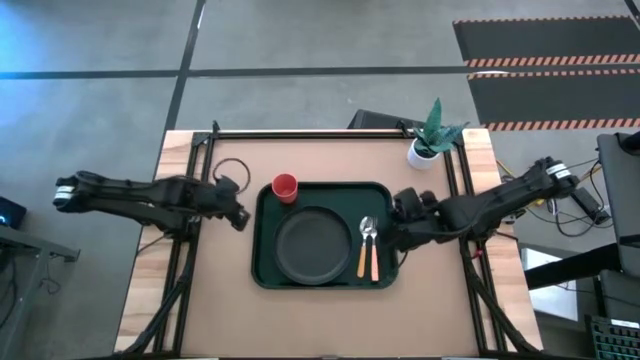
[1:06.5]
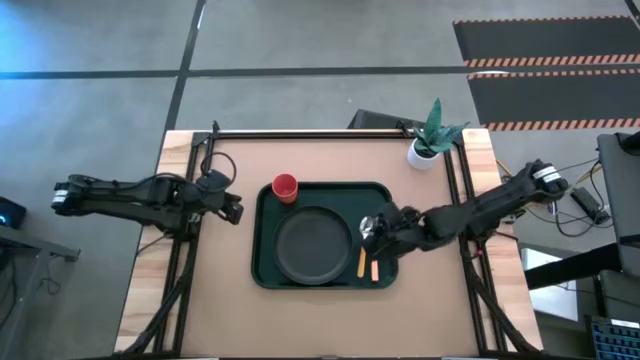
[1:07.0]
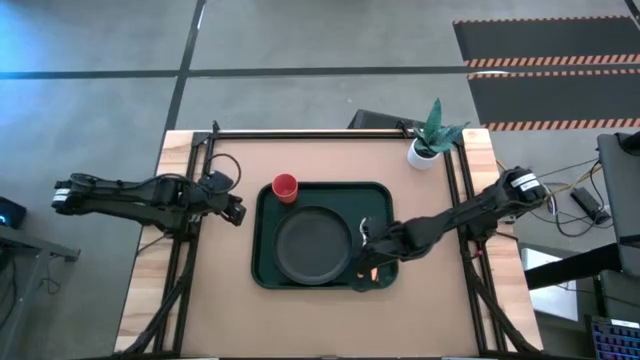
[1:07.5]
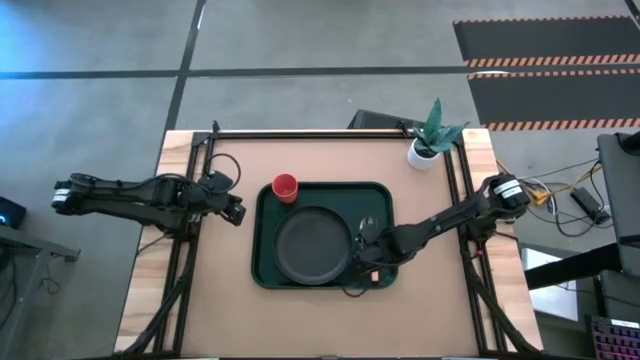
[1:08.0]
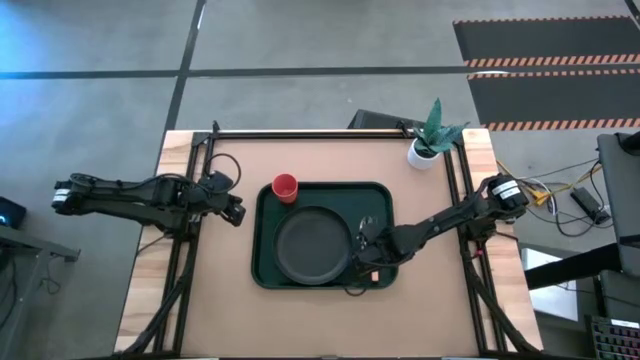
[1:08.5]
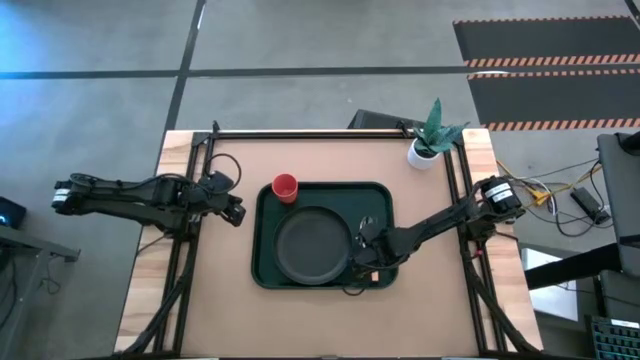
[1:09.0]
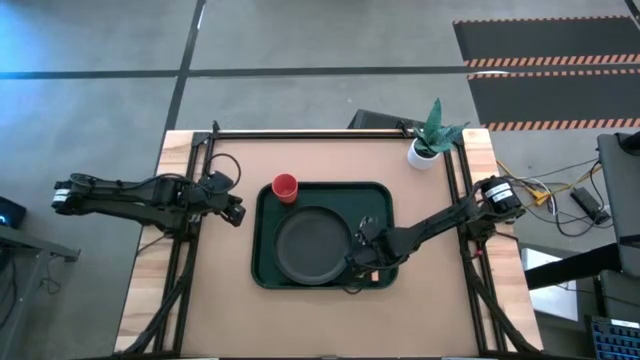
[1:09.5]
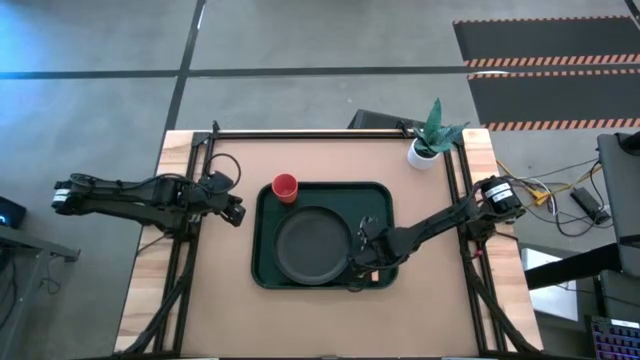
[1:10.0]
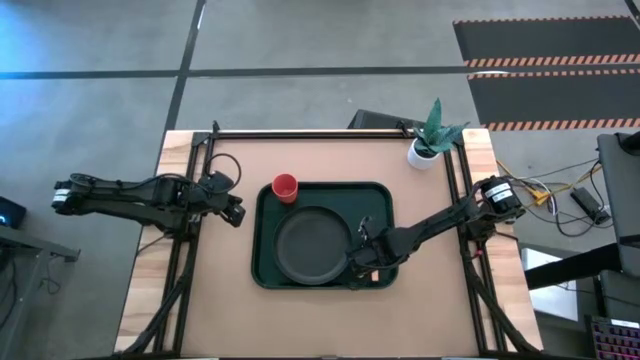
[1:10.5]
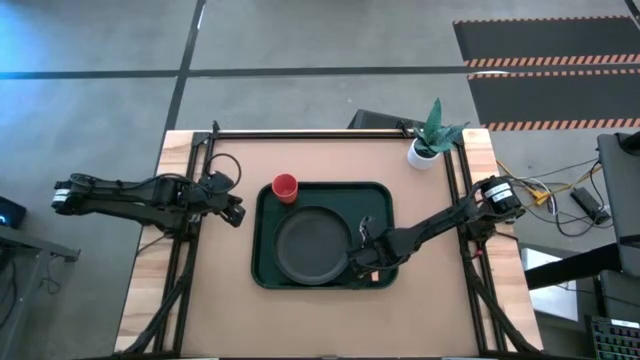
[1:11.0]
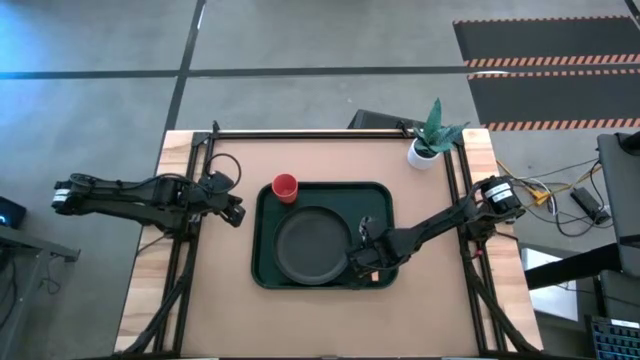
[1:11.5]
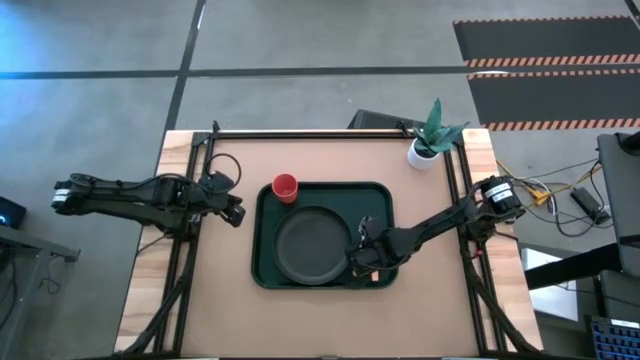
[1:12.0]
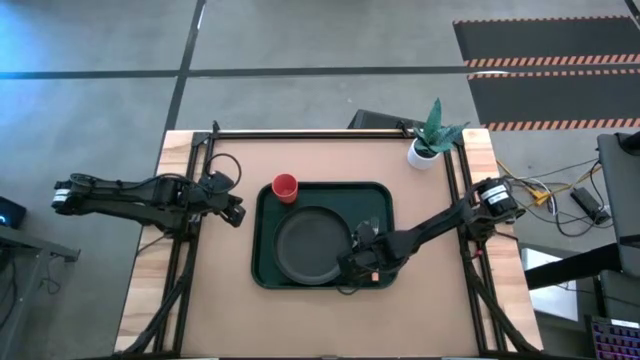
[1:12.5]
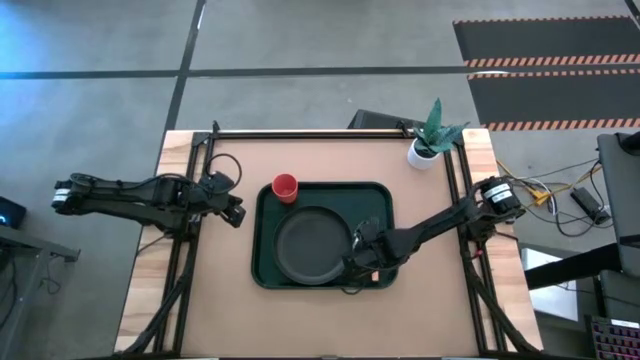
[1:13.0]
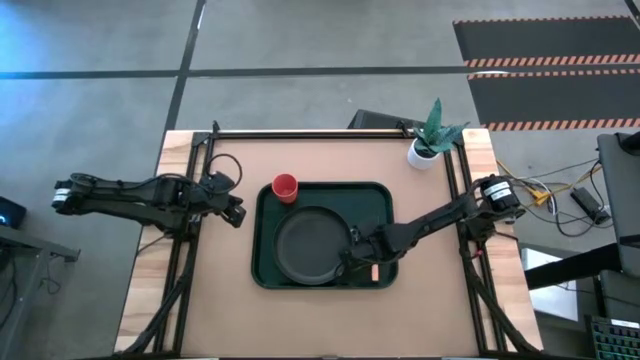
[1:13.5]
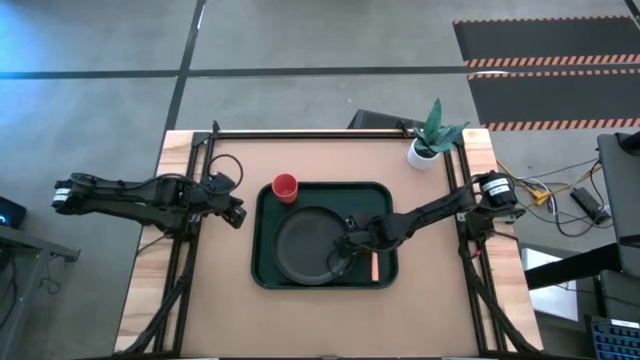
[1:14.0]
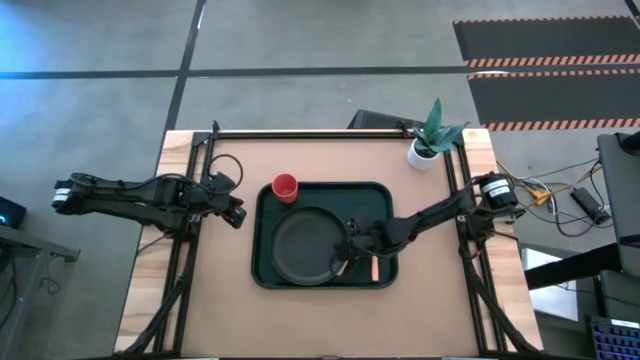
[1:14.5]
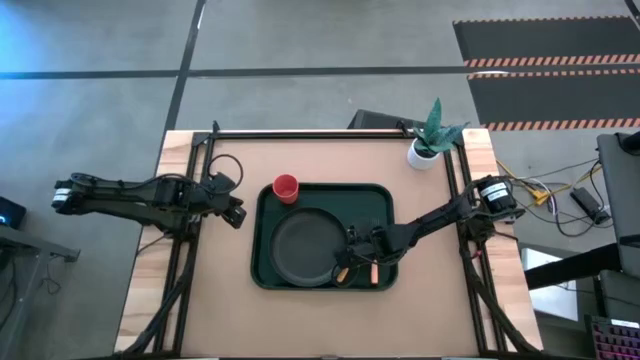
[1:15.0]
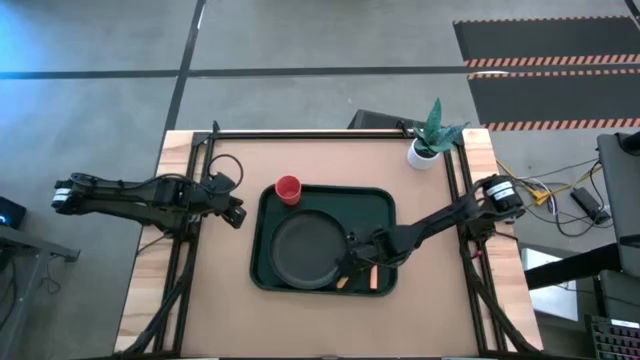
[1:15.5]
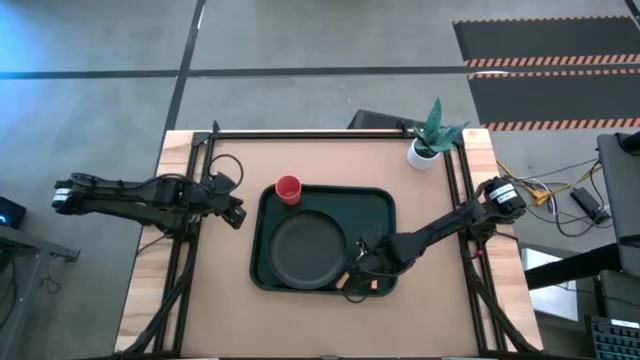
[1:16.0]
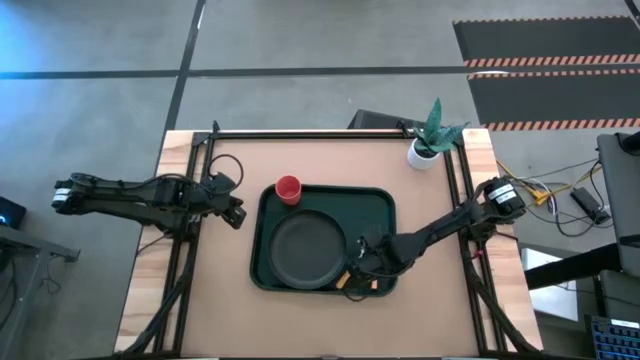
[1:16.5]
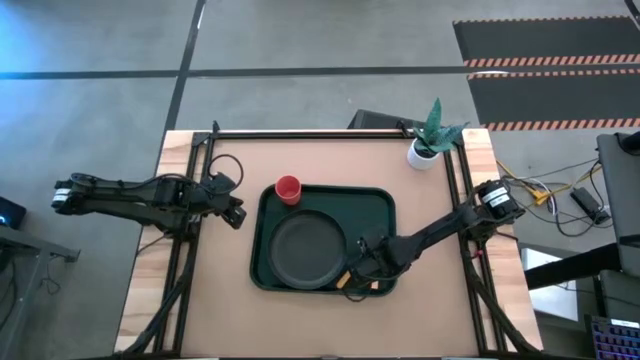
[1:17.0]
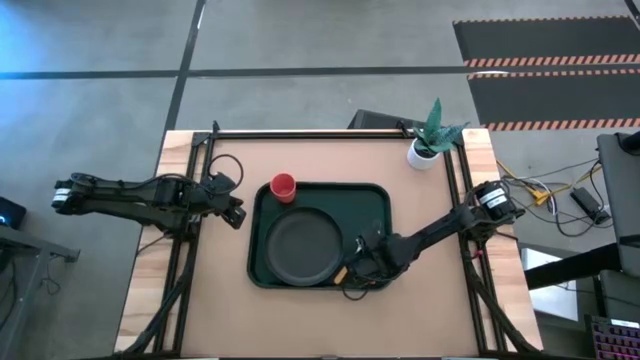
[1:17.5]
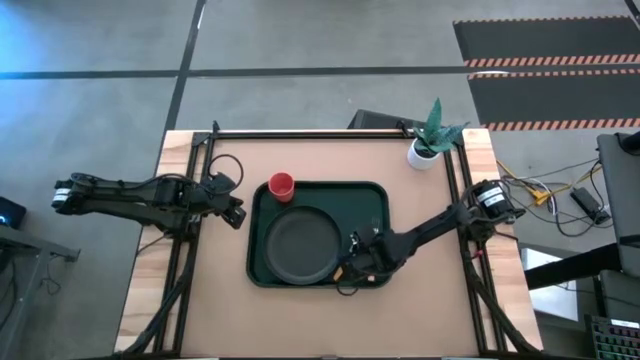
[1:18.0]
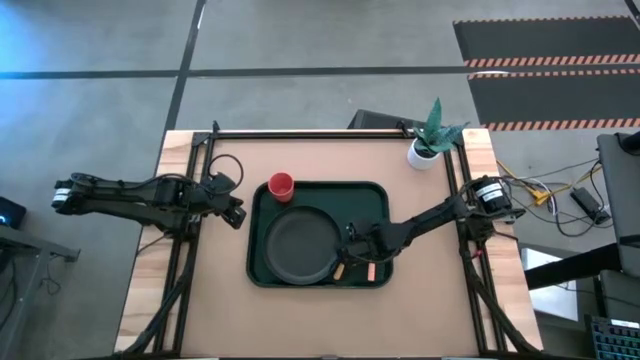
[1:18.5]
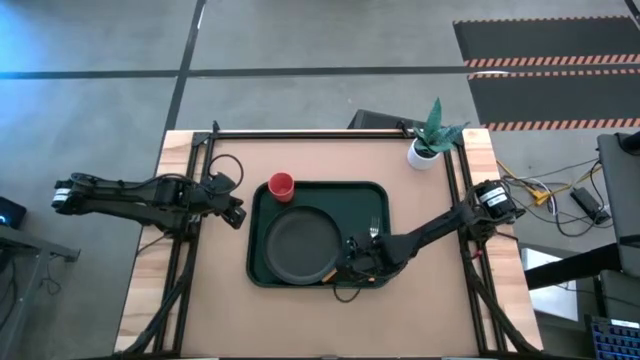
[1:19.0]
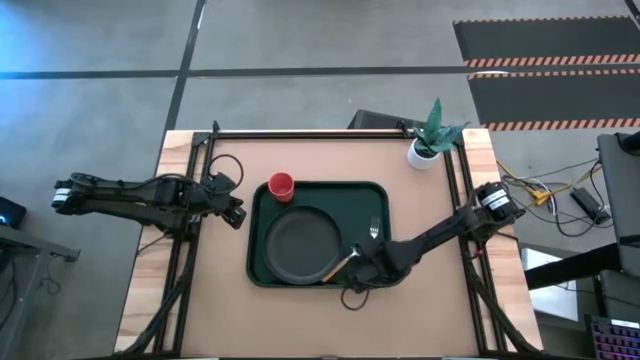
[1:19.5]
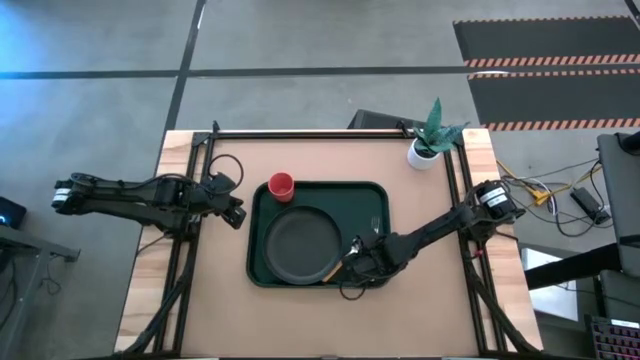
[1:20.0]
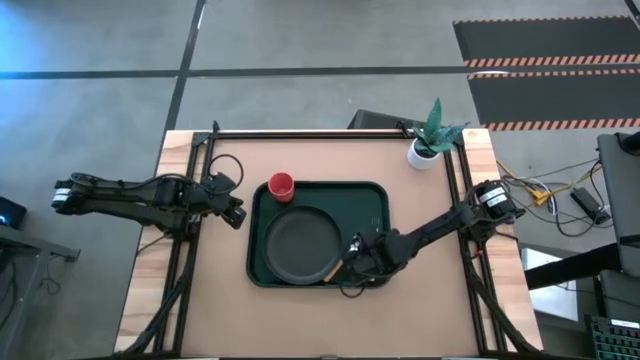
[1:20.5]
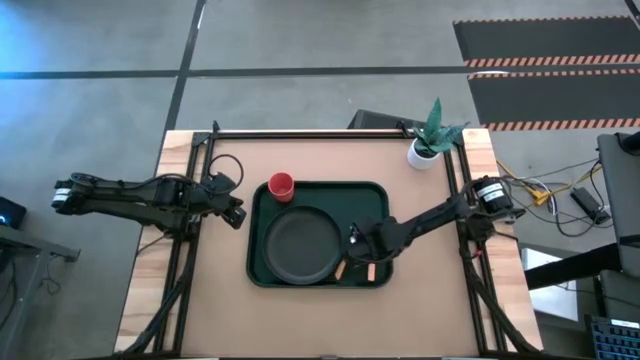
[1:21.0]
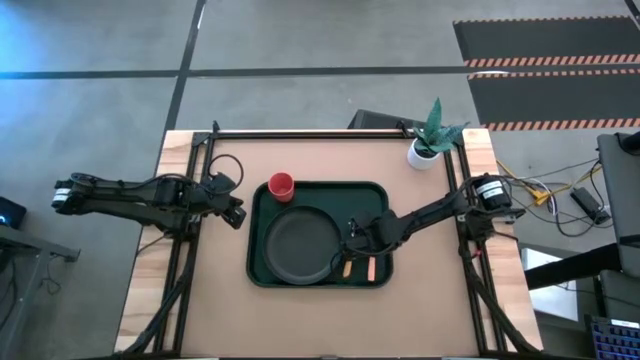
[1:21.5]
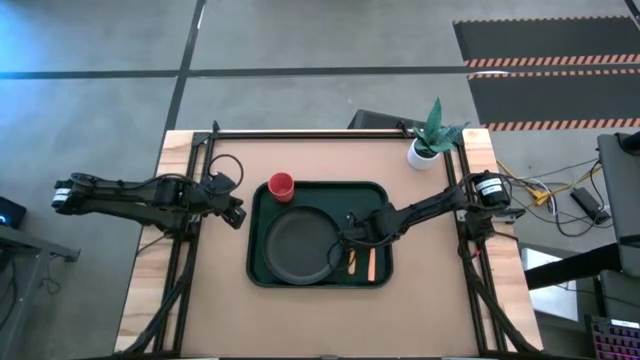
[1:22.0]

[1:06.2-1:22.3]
Task: Pick and place plate/cup/fork/spoon on tray
Adjust the orange spoon on the black tray

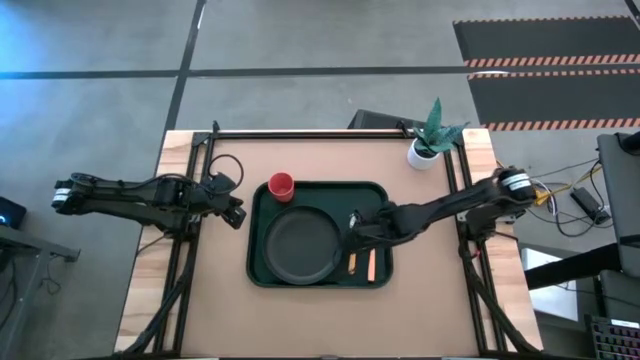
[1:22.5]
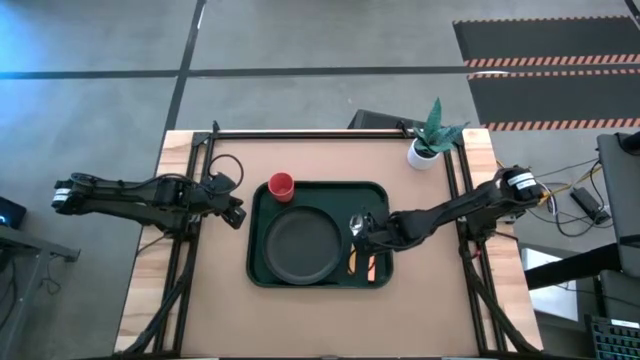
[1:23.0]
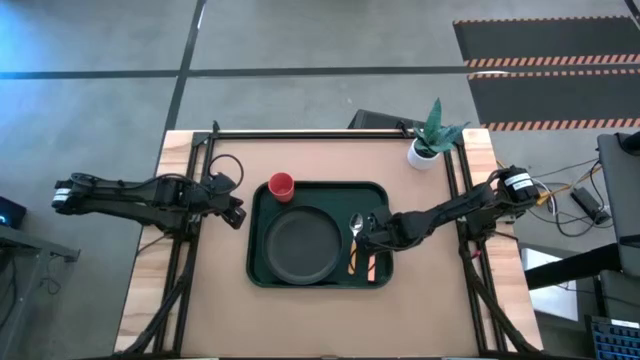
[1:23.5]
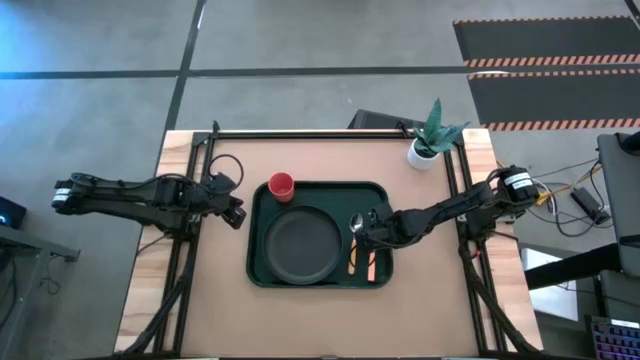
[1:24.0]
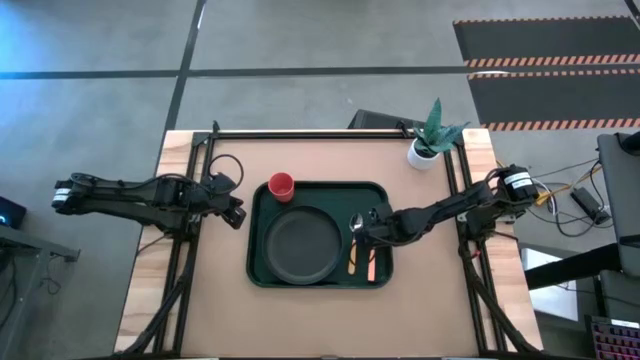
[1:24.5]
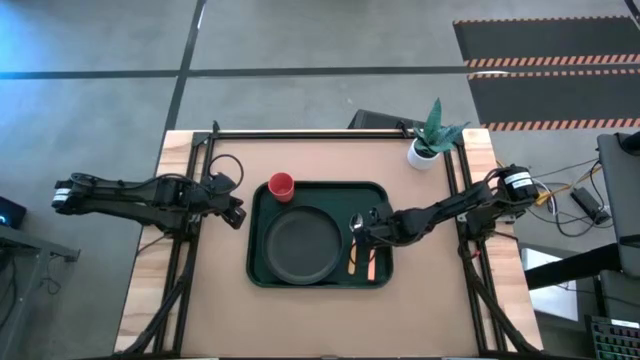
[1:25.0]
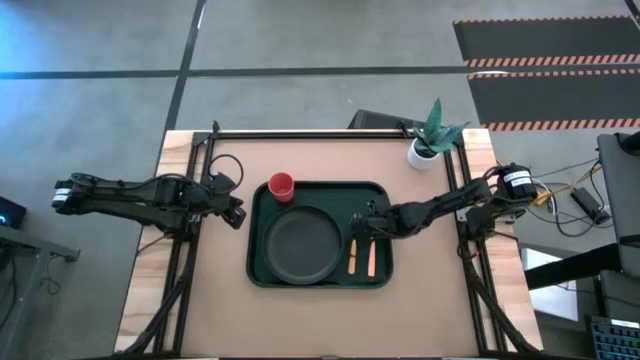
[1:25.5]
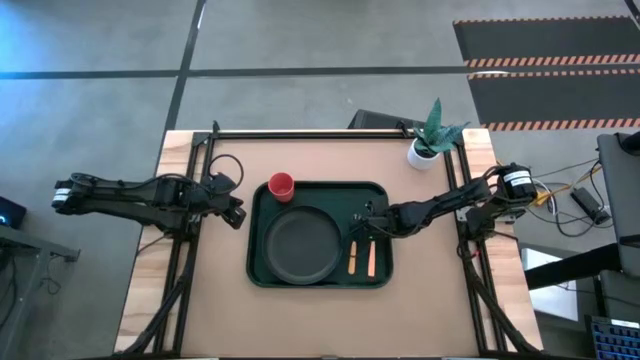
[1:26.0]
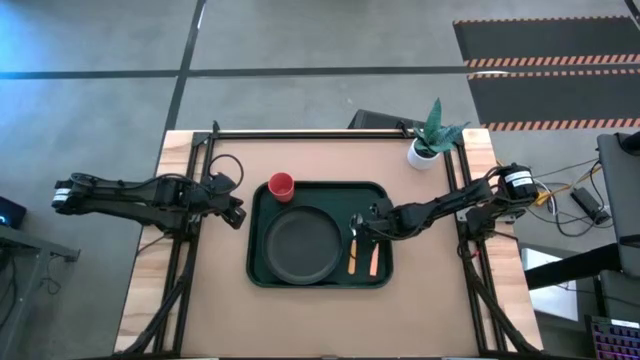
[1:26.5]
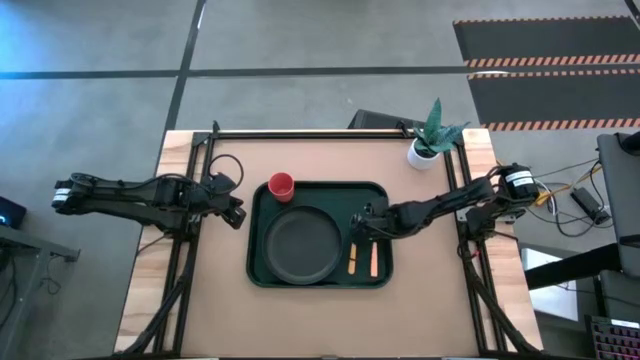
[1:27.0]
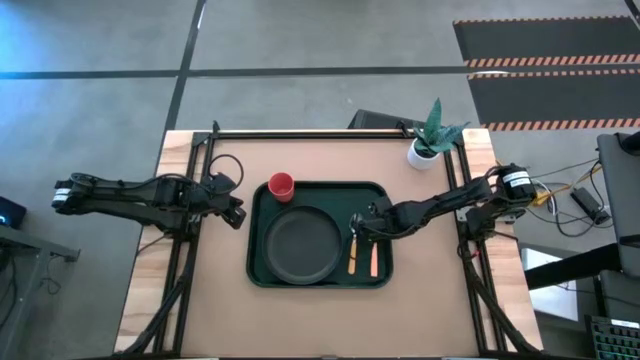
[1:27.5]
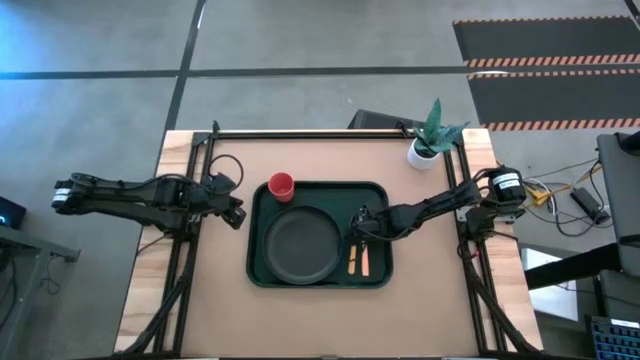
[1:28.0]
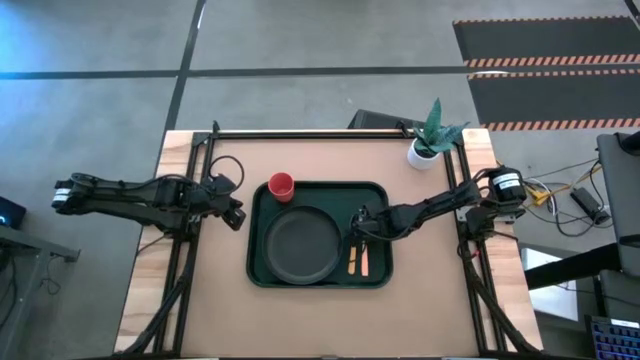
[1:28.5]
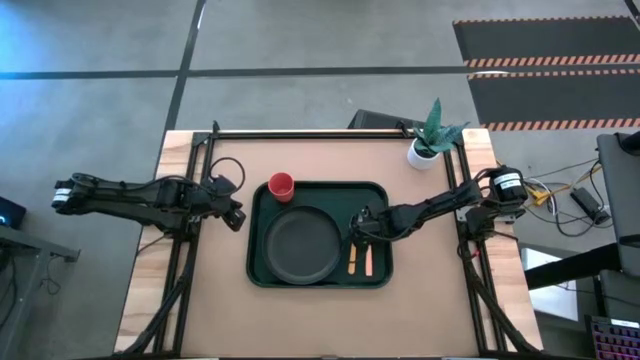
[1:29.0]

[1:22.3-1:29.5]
Adjust the orange fork on the black tray
